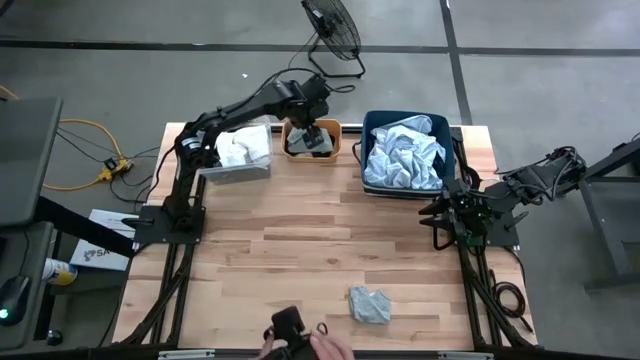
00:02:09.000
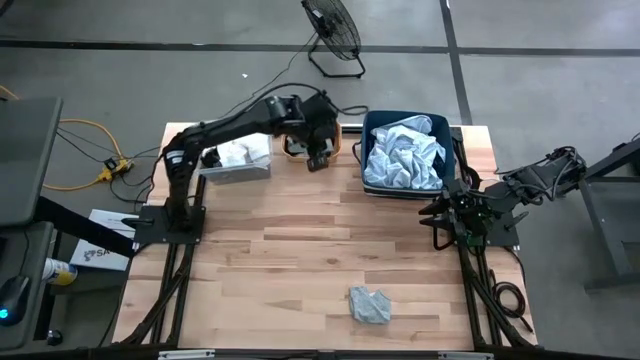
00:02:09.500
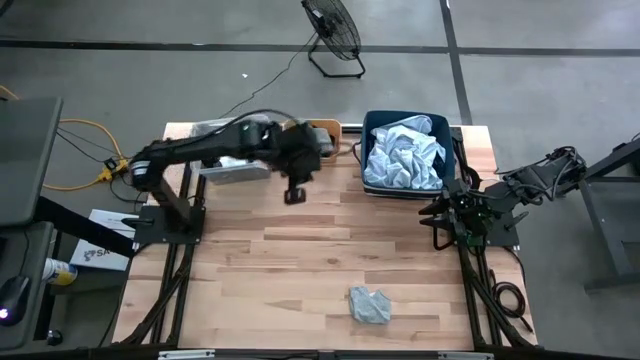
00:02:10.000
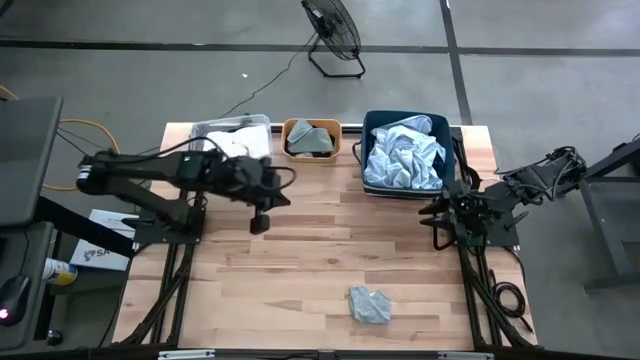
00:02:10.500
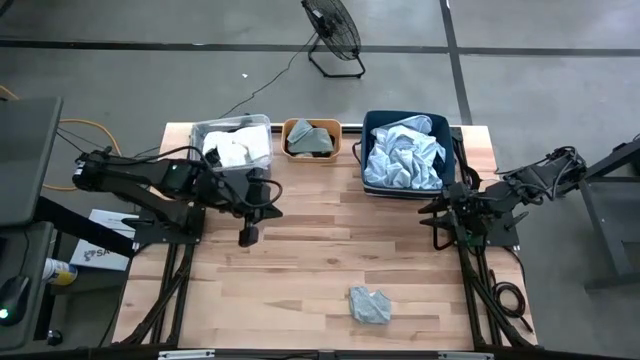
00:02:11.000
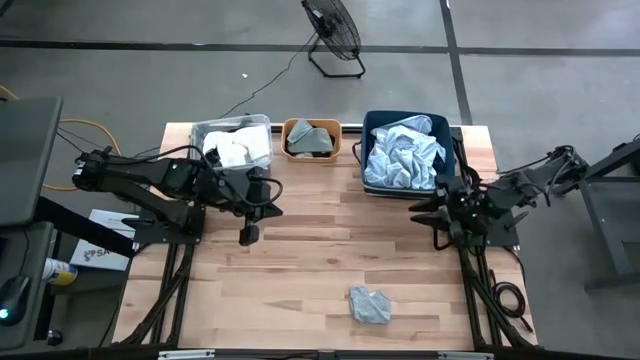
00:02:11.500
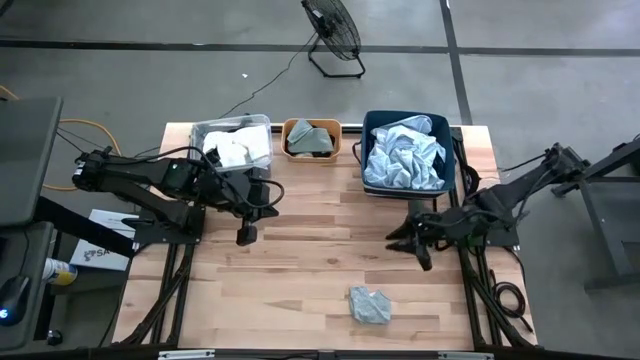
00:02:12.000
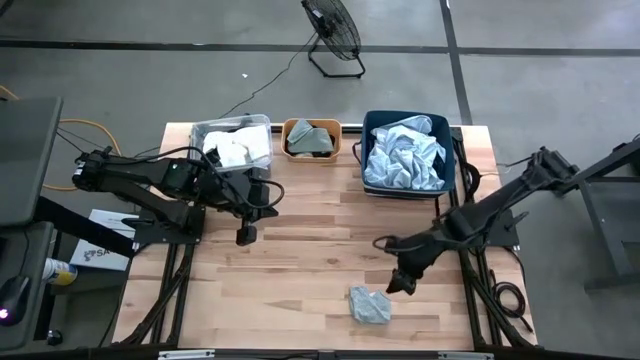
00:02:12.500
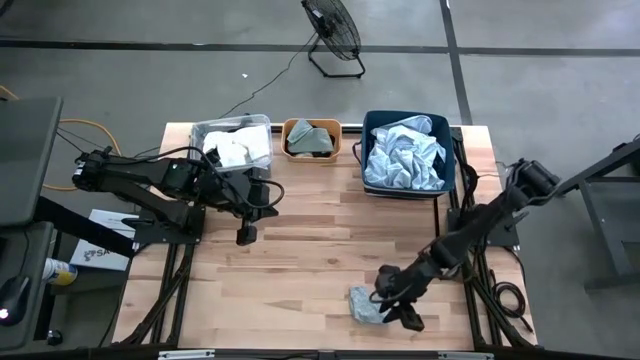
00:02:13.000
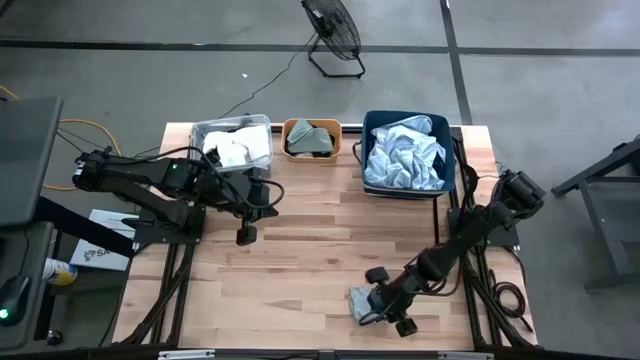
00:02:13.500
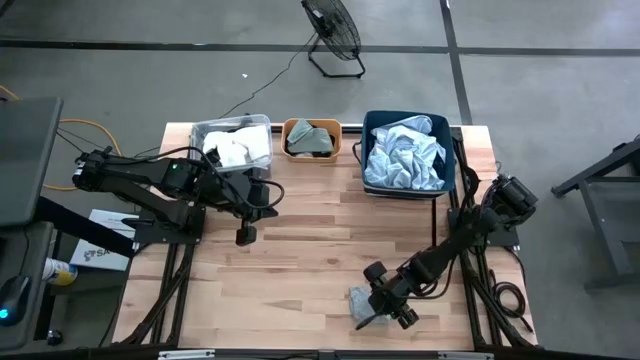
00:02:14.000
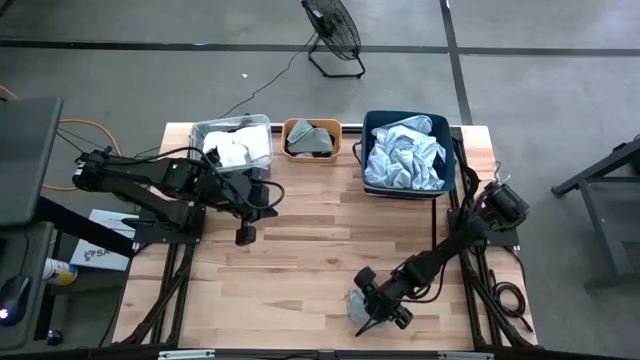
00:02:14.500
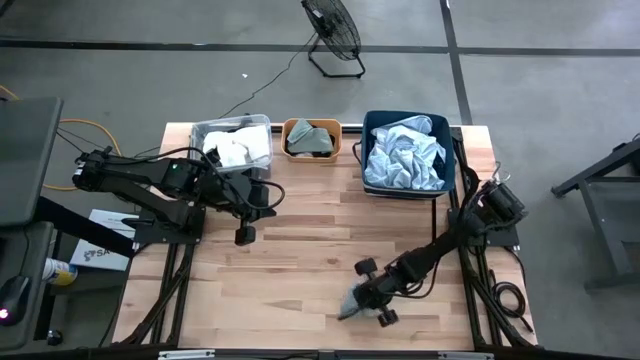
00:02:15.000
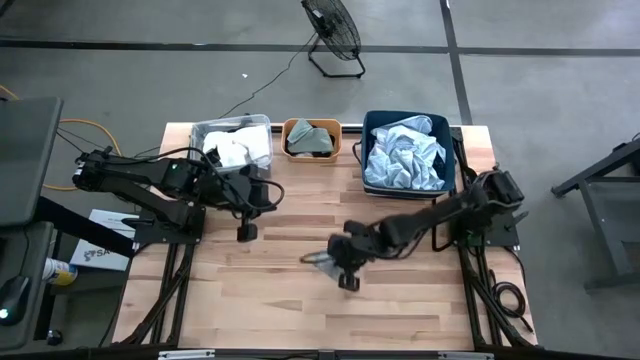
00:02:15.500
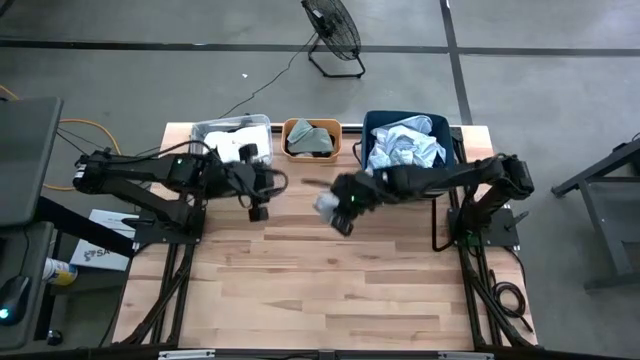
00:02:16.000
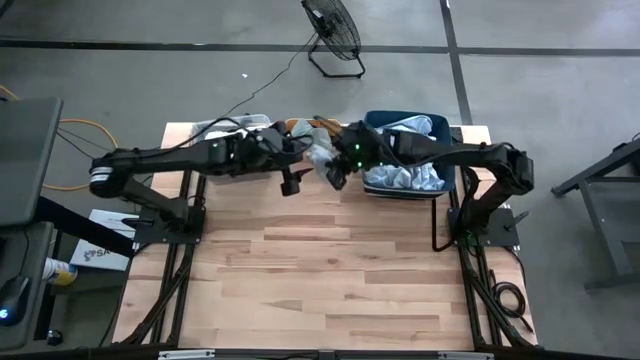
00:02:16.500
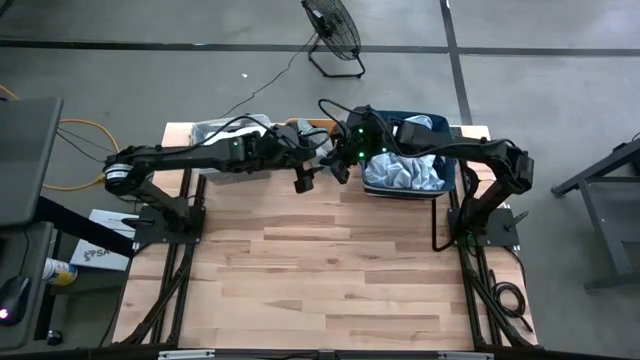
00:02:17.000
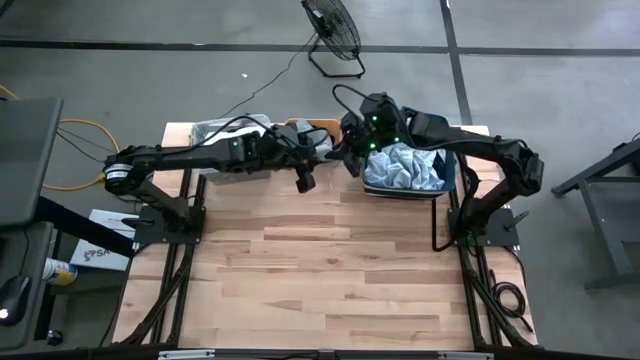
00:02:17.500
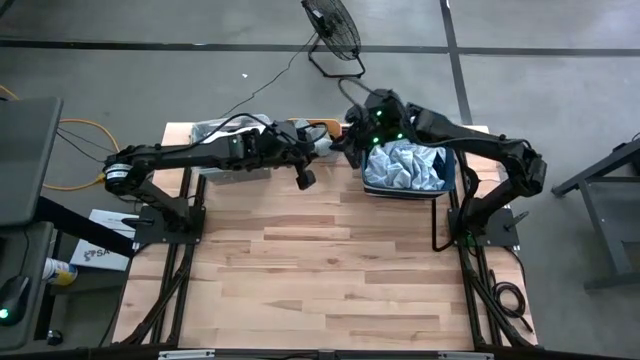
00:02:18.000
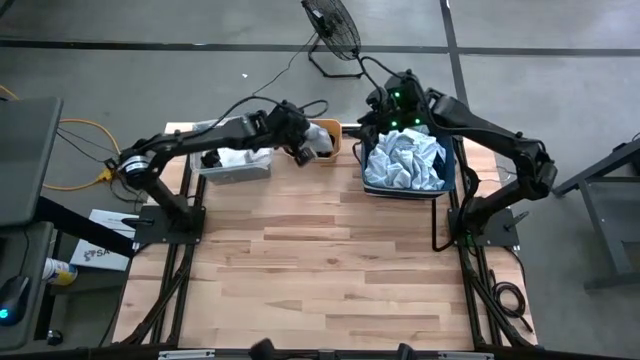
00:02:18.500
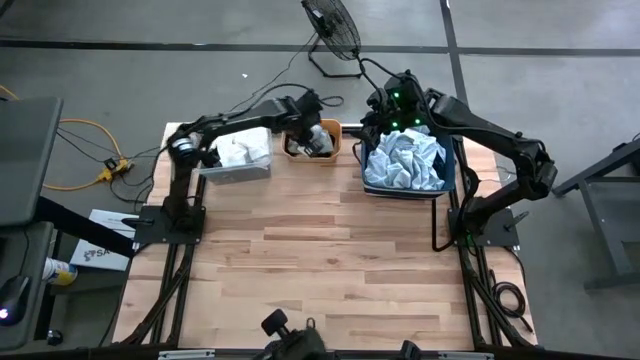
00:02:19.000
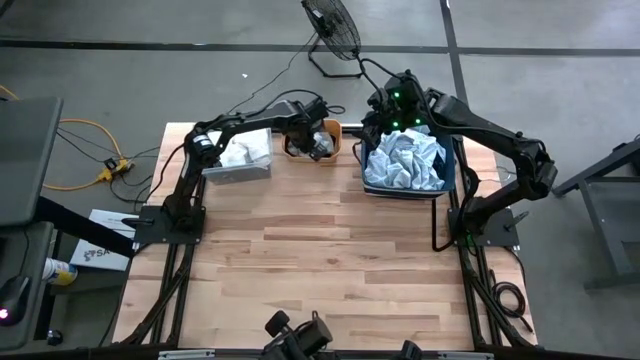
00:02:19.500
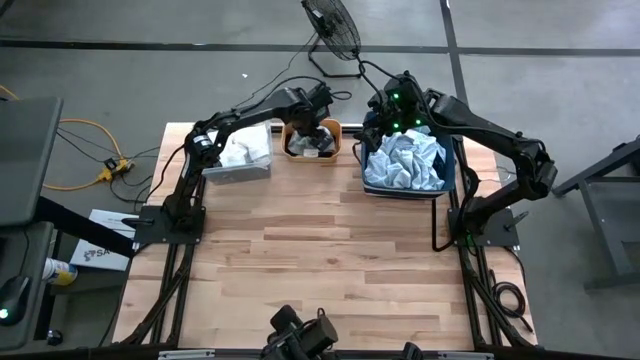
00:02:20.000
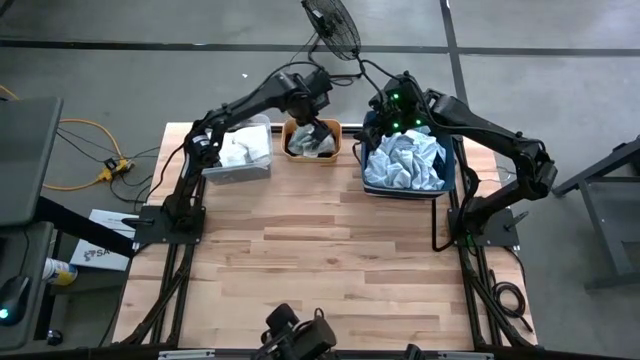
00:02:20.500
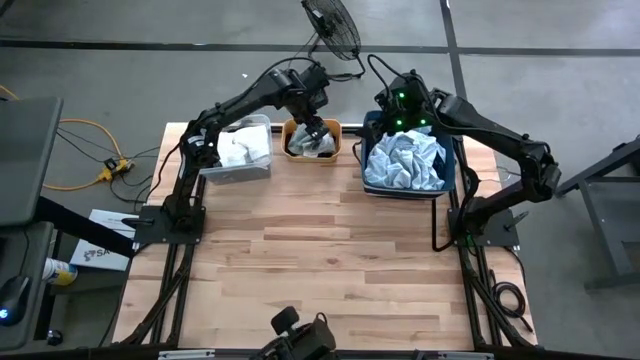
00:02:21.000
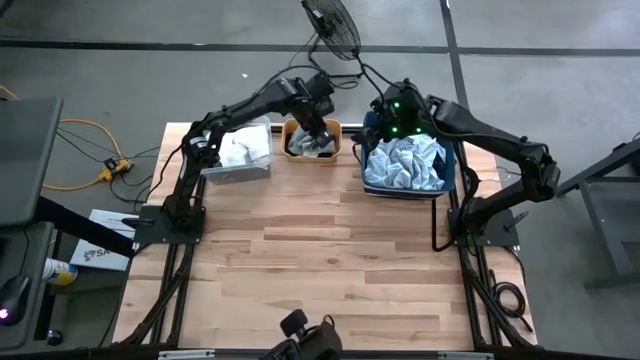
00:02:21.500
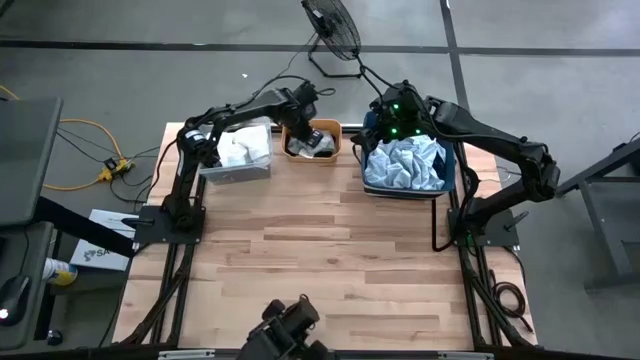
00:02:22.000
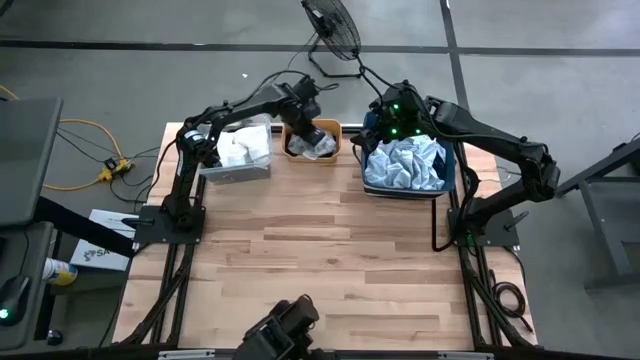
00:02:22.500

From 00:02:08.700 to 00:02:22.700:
Task: Pick & Place Cloths
Put the light gray sock into the yellow bin

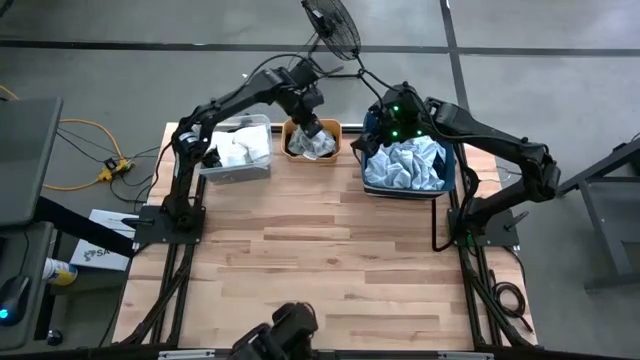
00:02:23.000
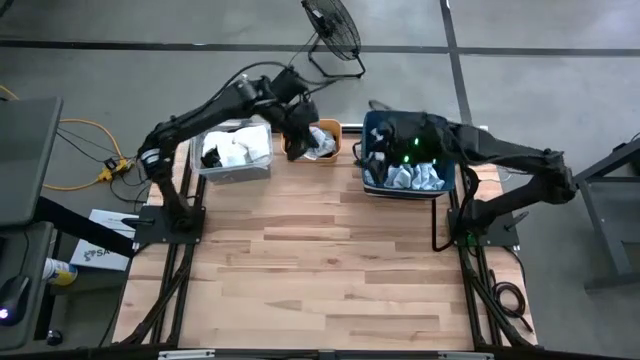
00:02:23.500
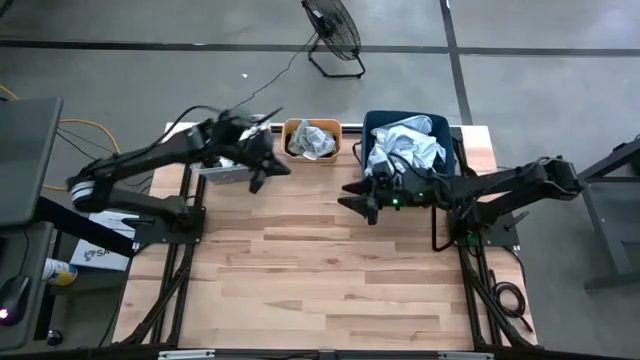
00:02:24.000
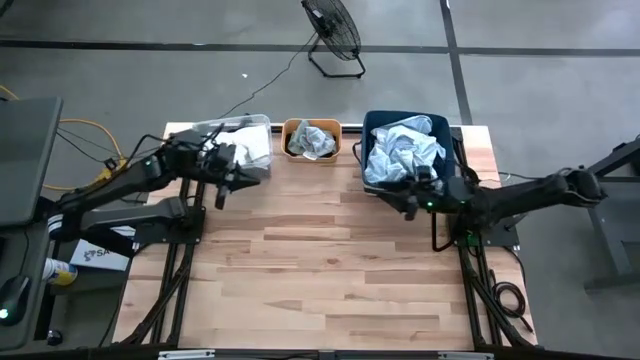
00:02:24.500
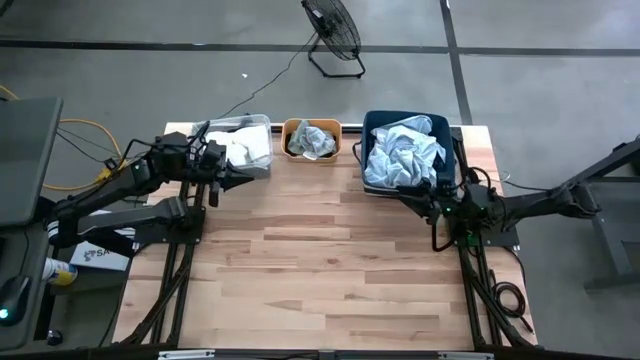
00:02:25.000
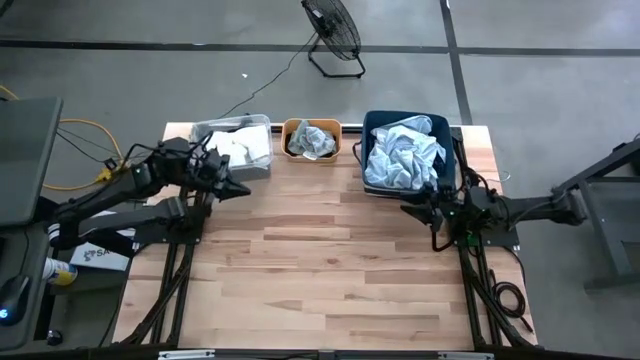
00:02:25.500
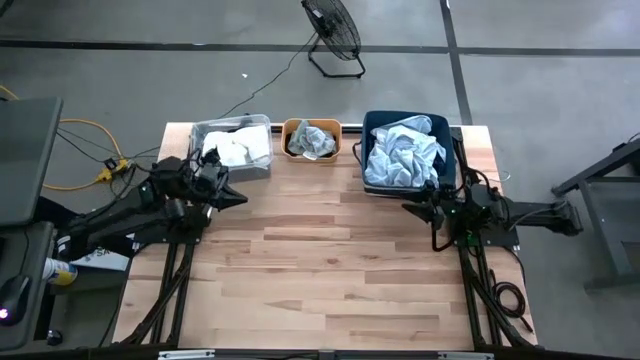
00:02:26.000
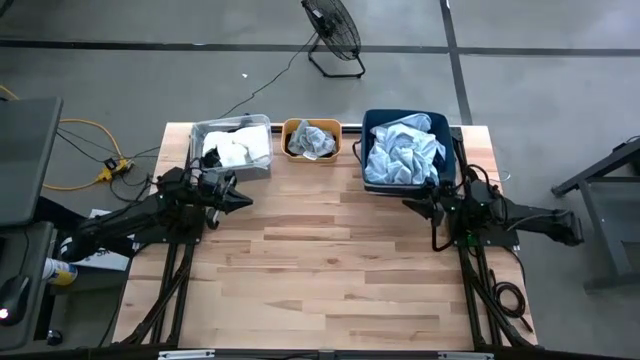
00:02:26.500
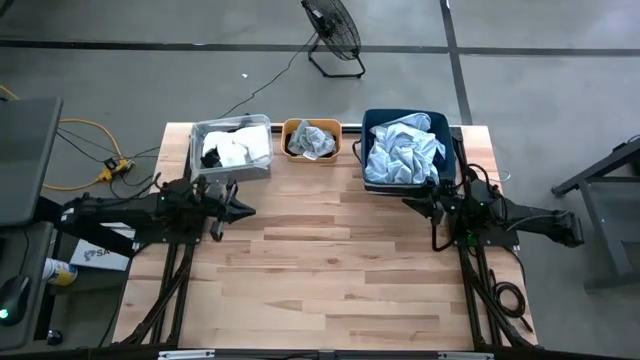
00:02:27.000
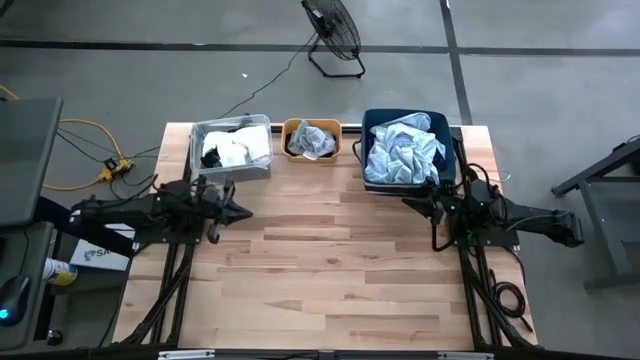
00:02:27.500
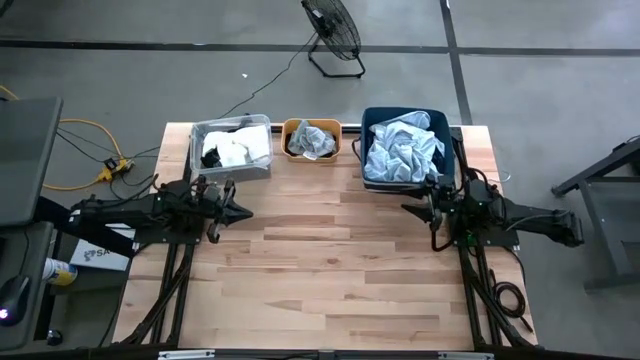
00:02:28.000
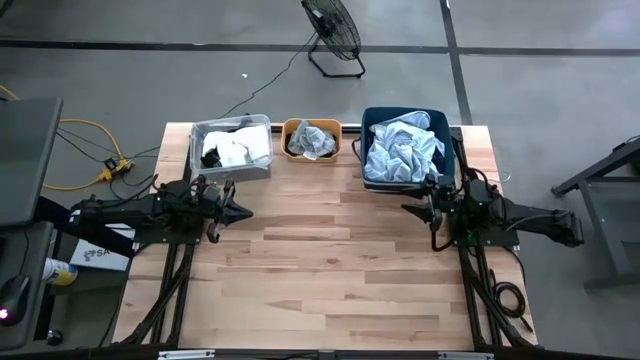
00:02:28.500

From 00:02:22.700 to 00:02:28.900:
Return to Home Position

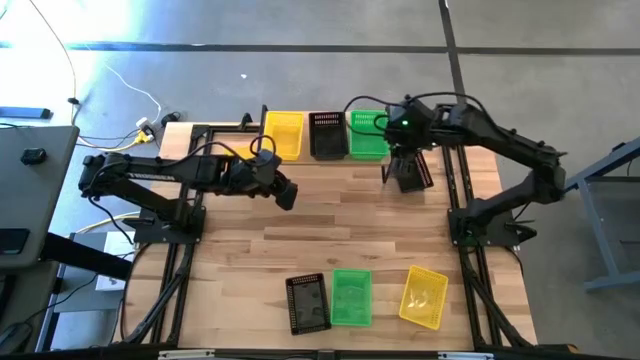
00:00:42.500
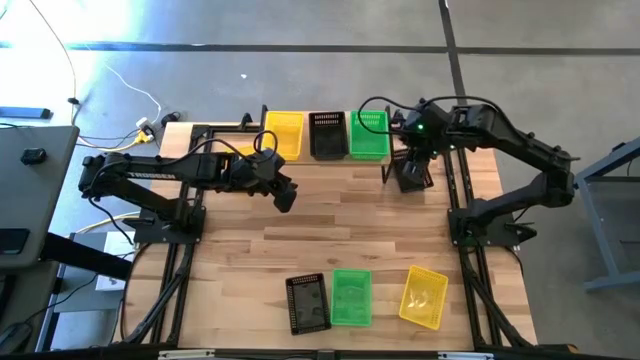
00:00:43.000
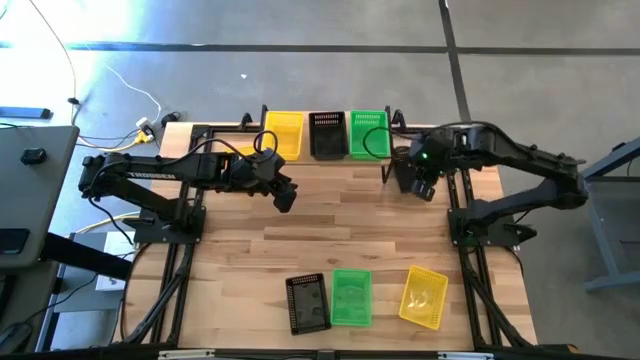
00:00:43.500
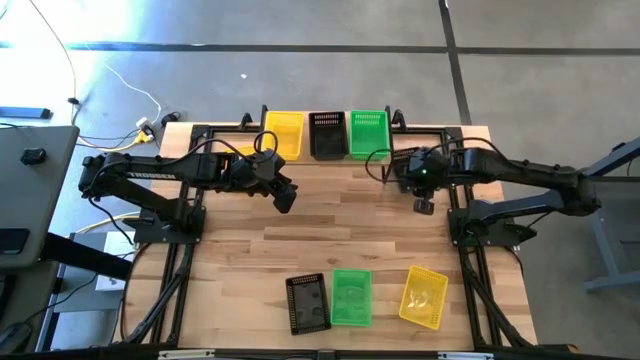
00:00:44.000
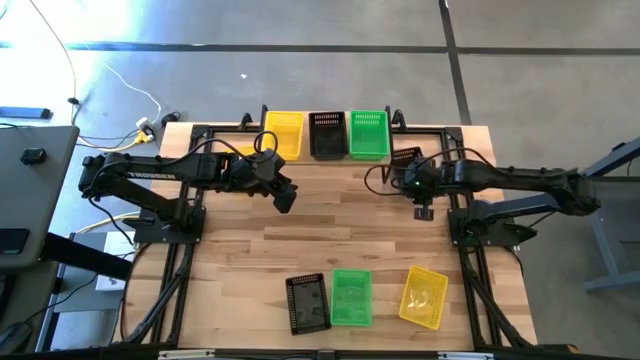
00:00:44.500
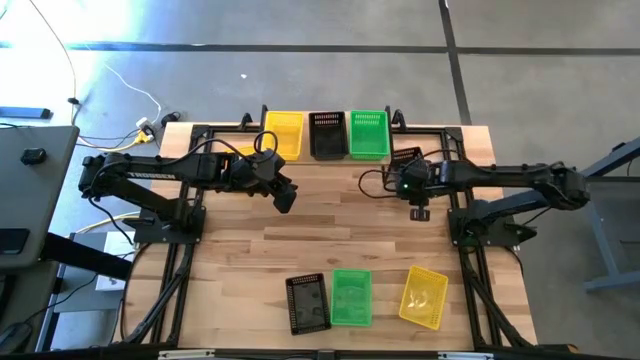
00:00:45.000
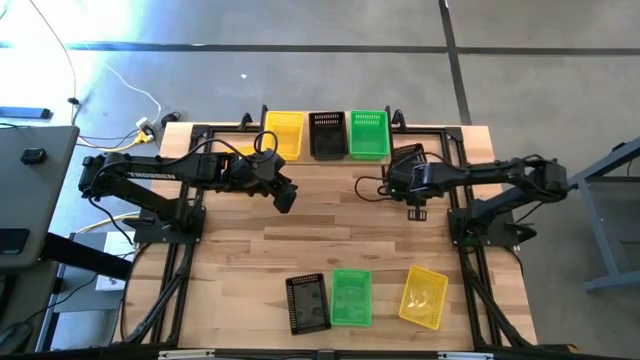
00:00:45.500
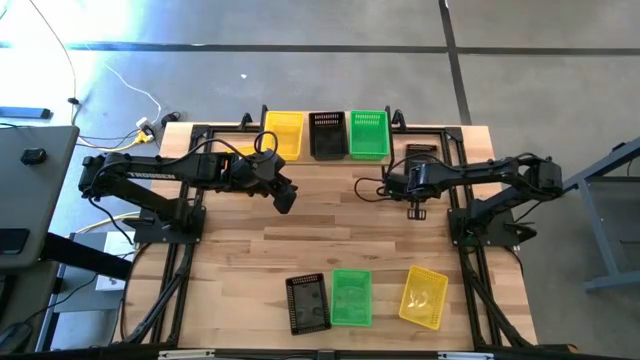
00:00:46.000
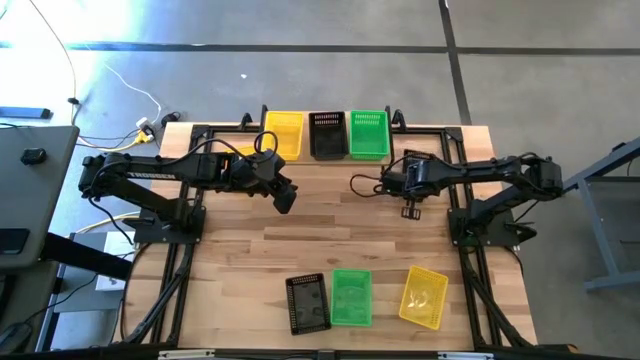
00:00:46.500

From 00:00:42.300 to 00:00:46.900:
Task: Stack baskets on shelf by color
Stack the top right black bin on the other black bin on the shelf
